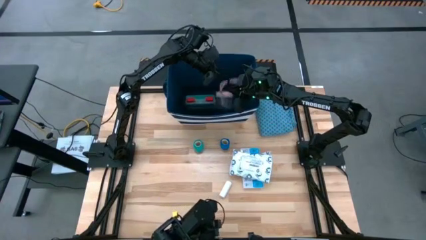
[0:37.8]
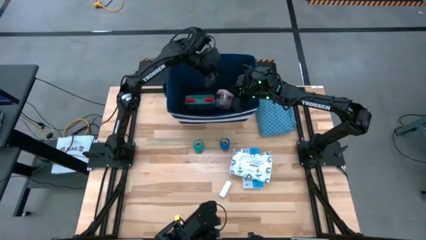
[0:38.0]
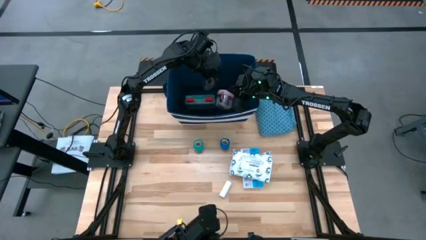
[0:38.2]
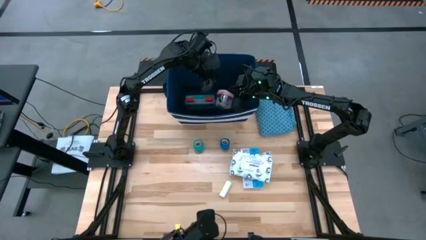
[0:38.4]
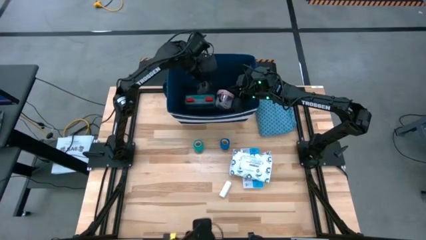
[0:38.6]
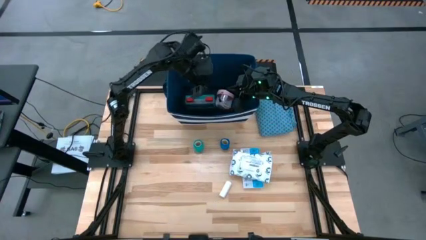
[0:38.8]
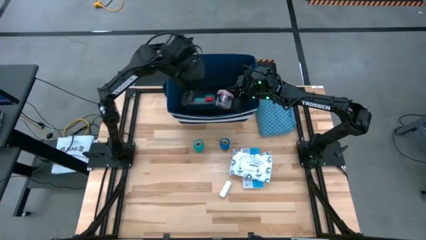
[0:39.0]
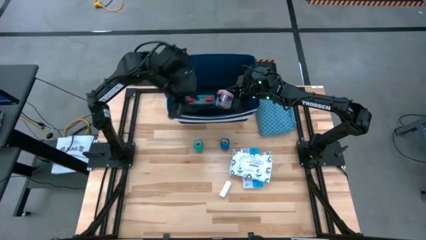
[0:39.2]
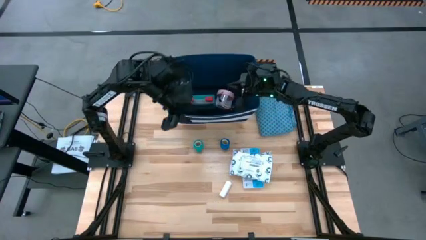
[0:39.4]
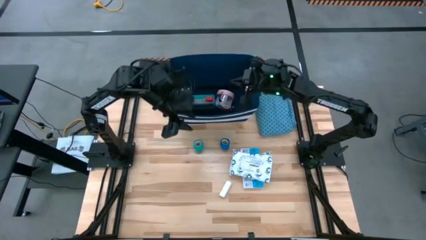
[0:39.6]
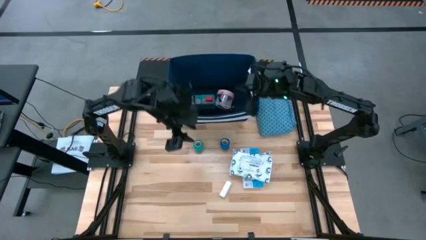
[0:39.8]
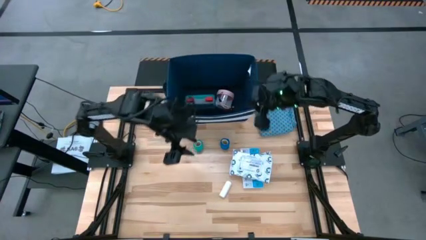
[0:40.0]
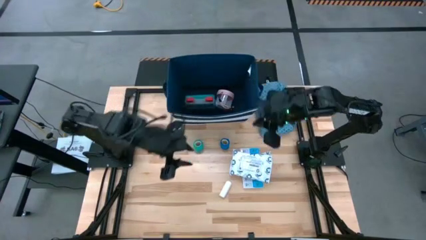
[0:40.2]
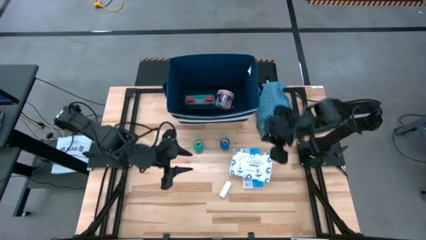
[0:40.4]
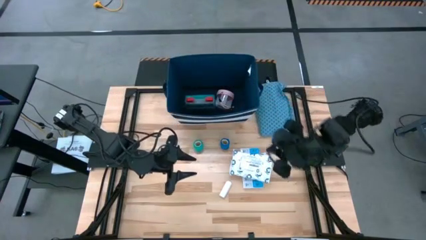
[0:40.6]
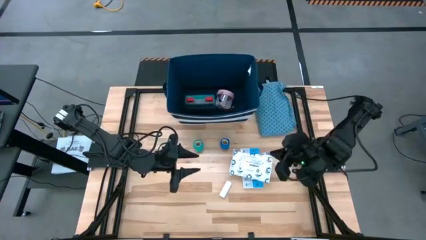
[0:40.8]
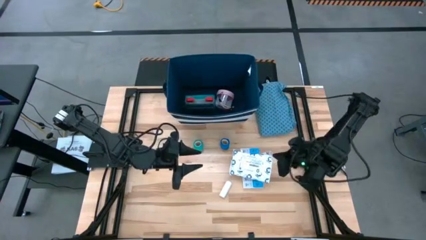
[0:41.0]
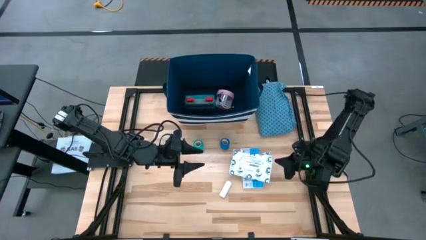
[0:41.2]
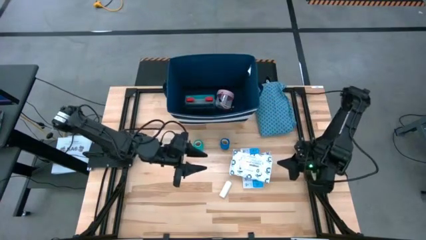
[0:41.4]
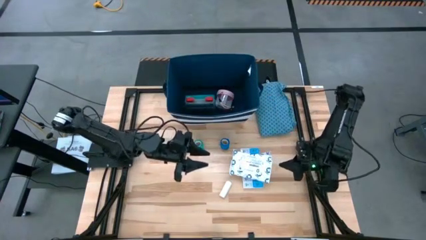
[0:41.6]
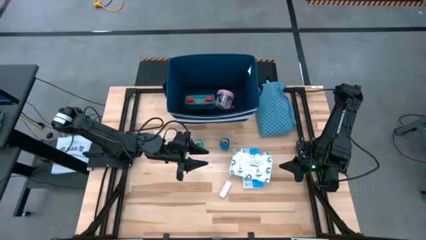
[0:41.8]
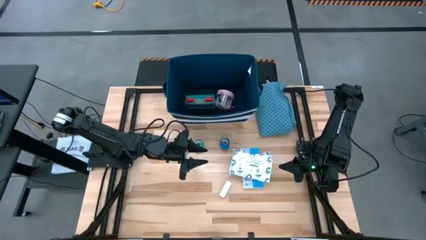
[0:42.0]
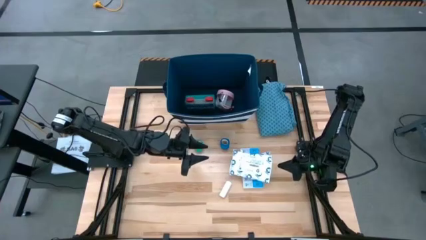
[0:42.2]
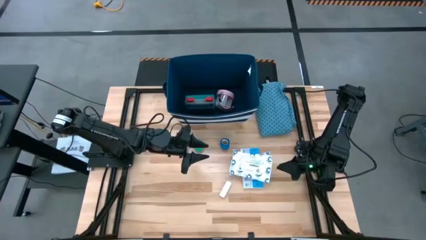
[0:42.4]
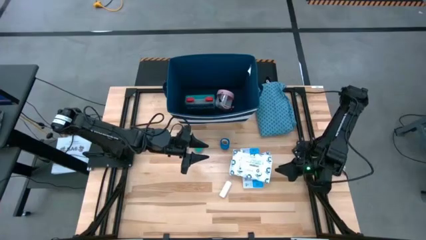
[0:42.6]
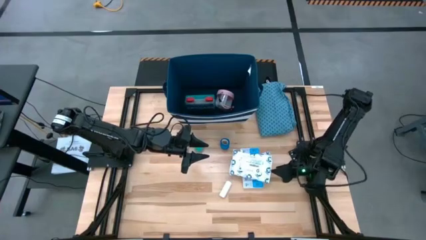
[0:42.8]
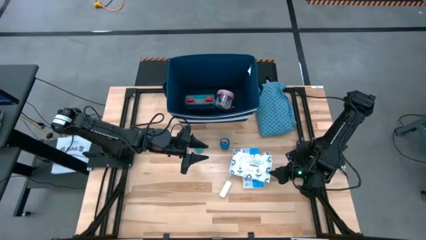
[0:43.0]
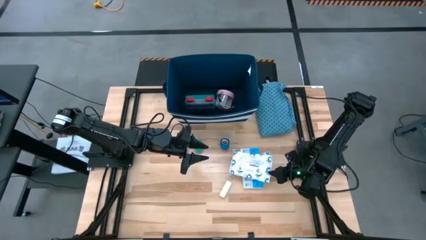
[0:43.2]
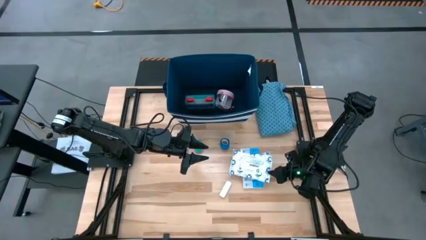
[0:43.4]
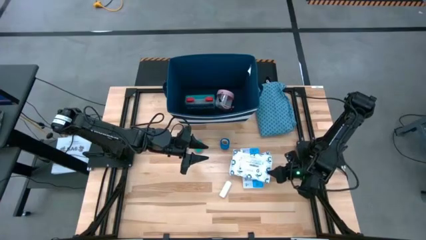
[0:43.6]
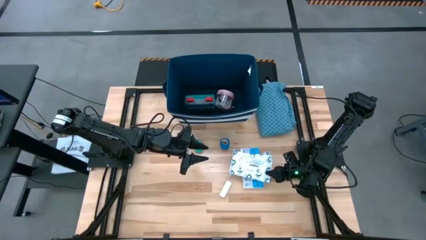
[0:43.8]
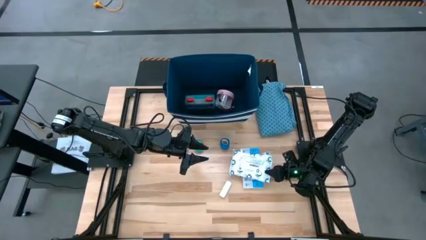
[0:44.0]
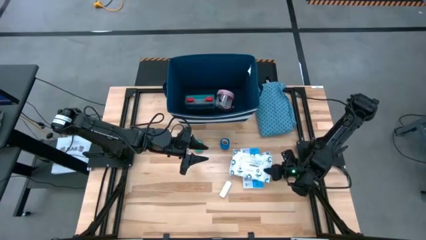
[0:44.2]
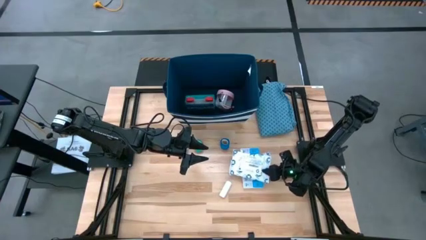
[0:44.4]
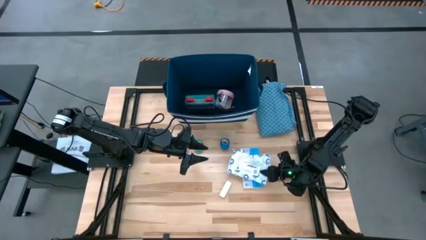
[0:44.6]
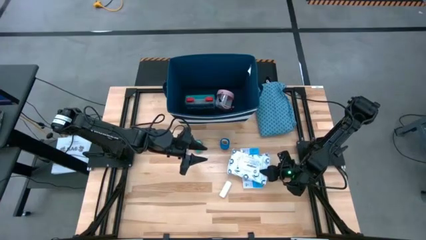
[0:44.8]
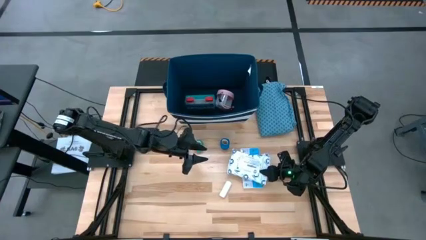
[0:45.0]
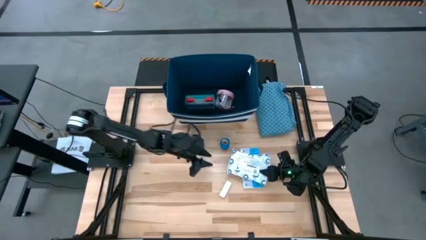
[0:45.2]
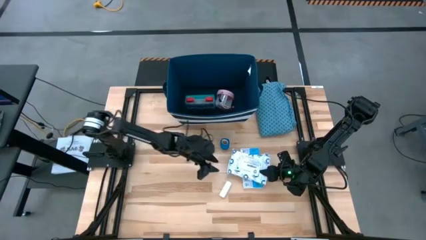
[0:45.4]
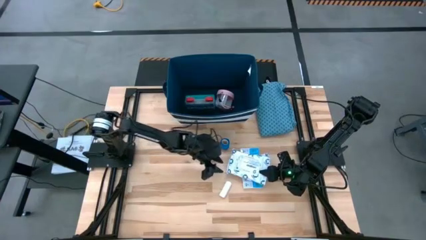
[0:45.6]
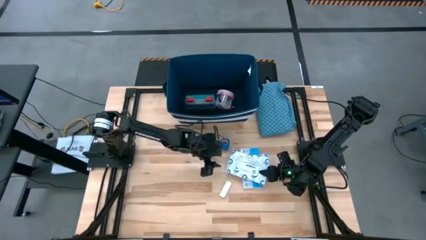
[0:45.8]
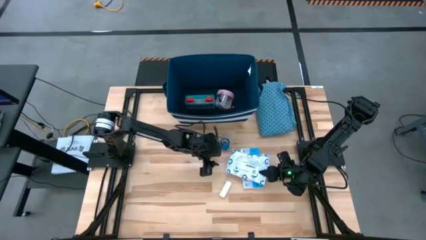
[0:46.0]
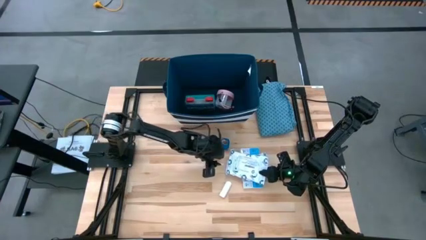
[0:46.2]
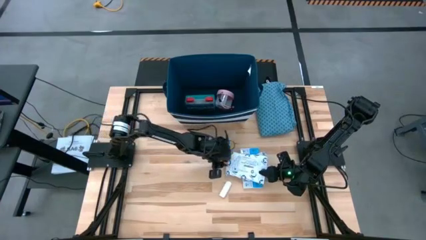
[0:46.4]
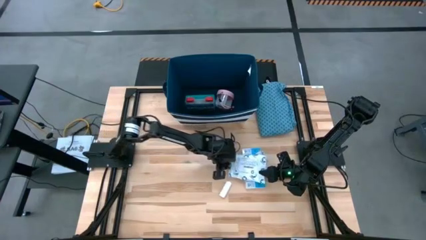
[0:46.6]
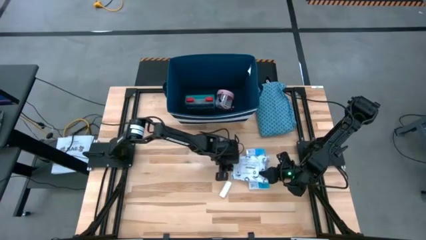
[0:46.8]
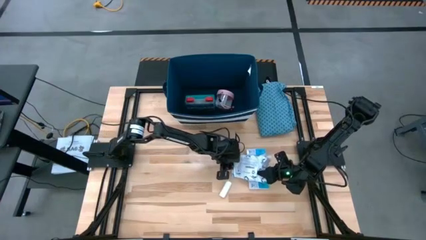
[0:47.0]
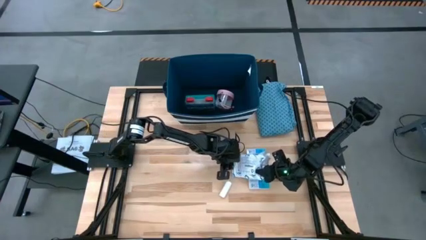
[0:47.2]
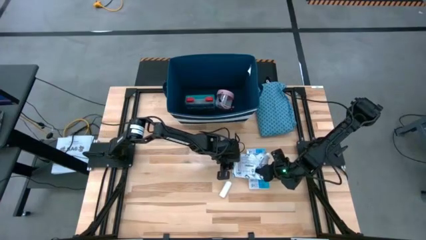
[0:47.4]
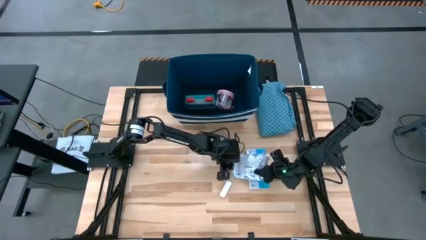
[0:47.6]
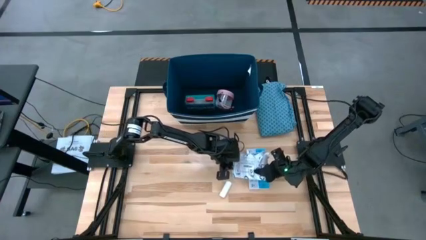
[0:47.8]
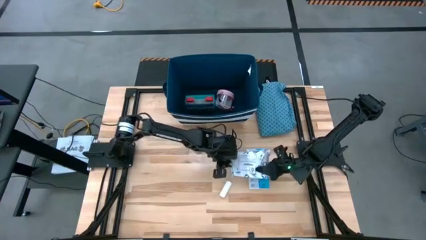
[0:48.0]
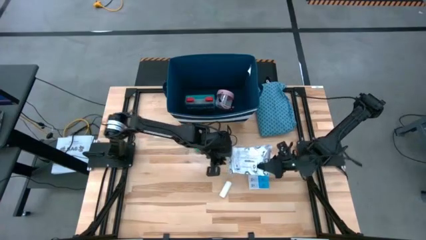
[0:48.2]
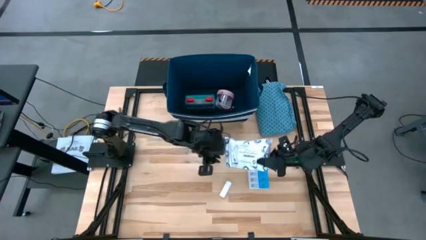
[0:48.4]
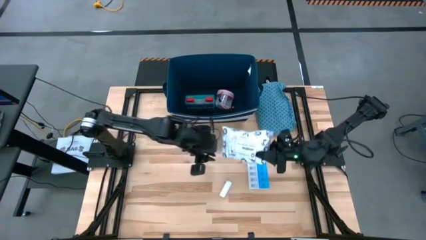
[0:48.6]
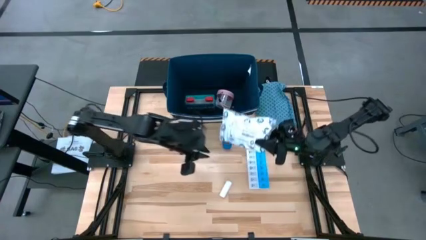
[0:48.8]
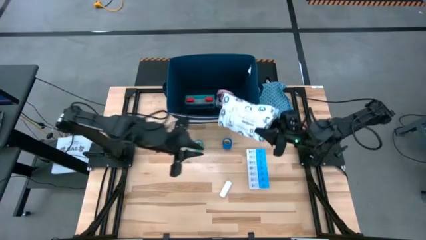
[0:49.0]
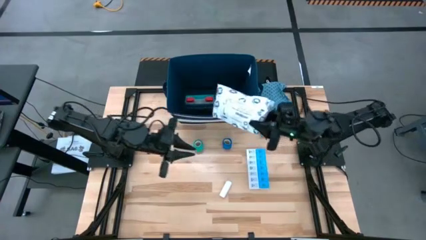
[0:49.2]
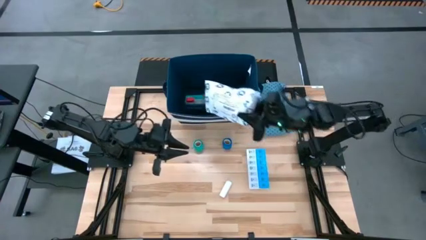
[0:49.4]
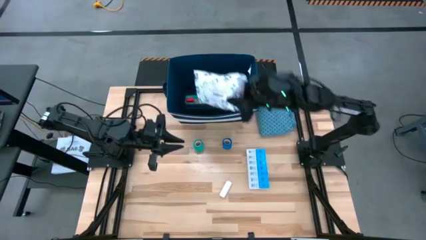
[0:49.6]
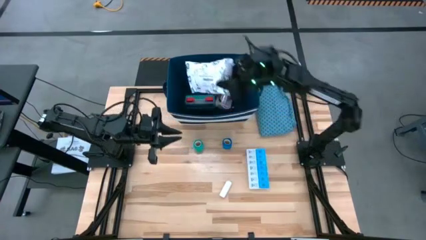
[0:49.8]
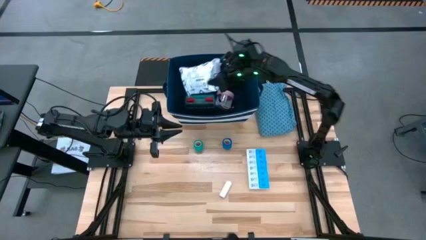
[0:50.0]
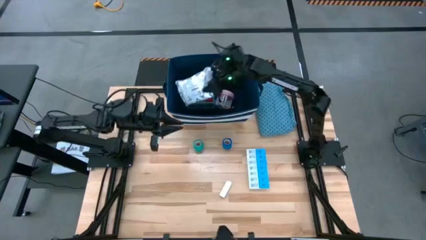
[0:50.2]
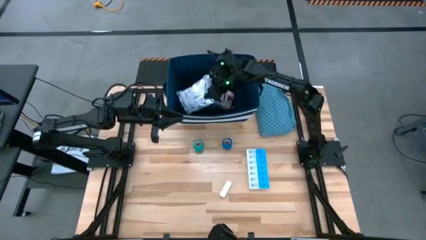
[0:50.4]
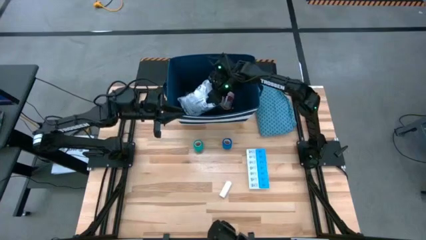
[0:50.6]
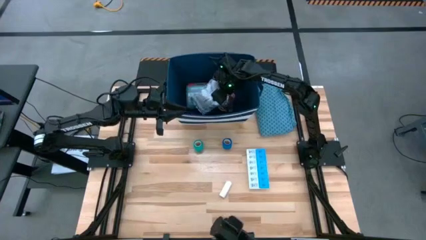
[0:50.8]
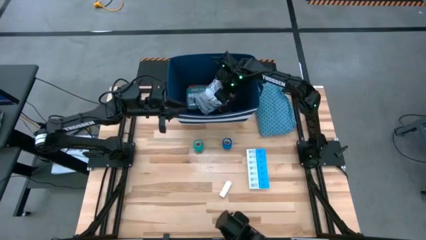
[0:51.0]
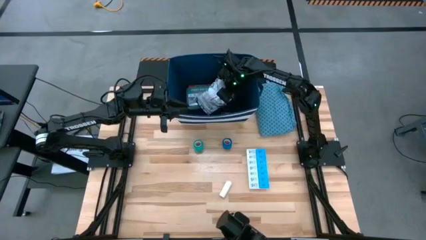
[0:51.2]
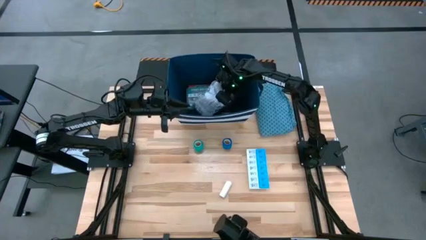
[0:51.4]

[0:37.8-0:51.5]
Task: Pick & place medical supplies in basket/bin
Put the sterile items into the bin
